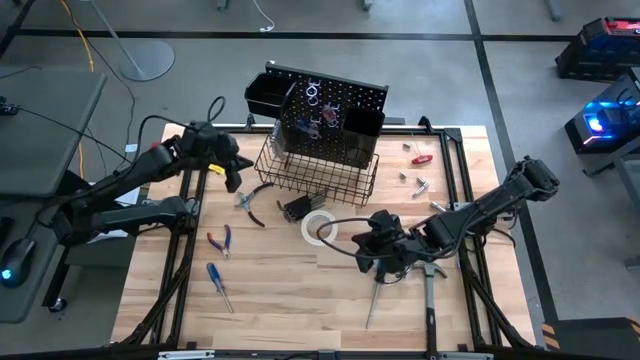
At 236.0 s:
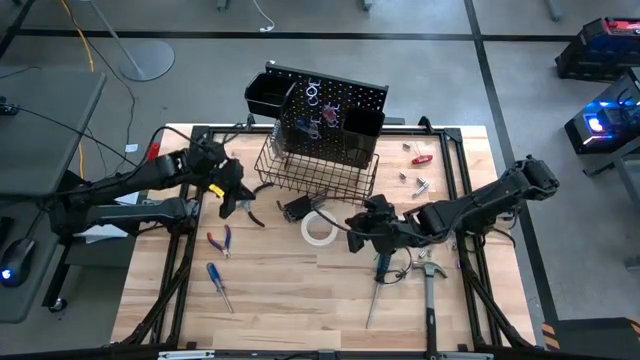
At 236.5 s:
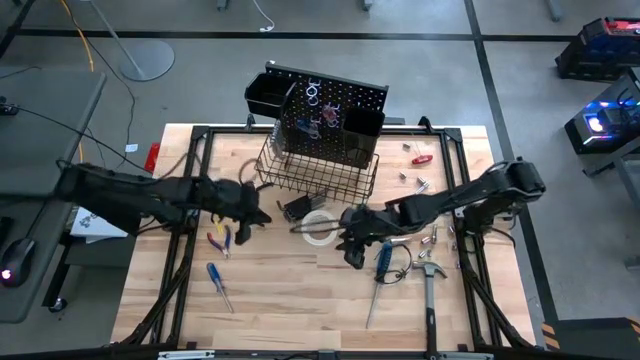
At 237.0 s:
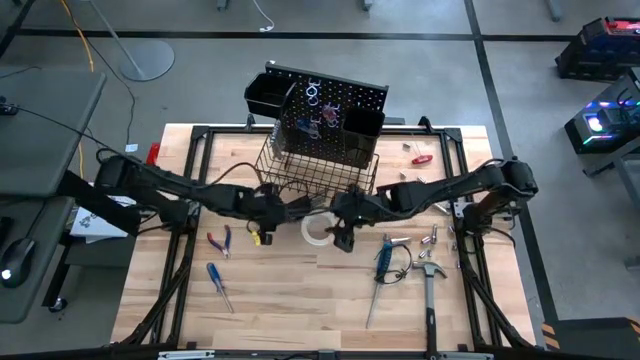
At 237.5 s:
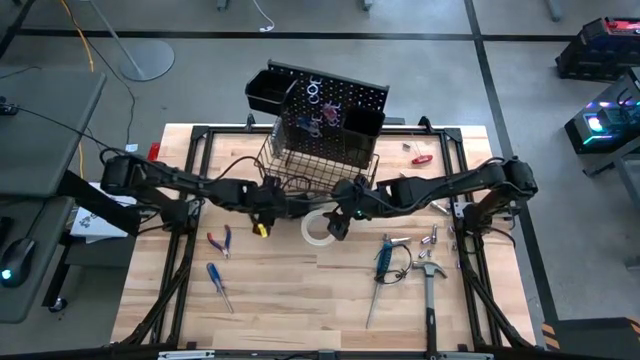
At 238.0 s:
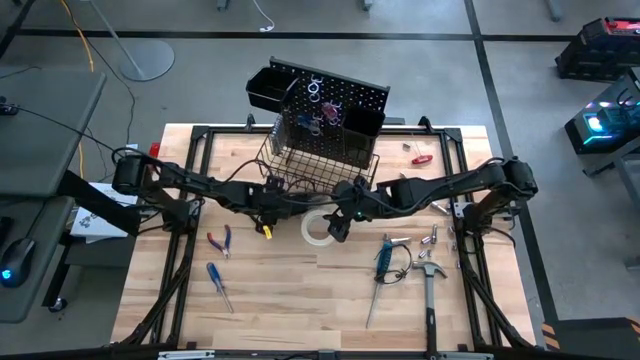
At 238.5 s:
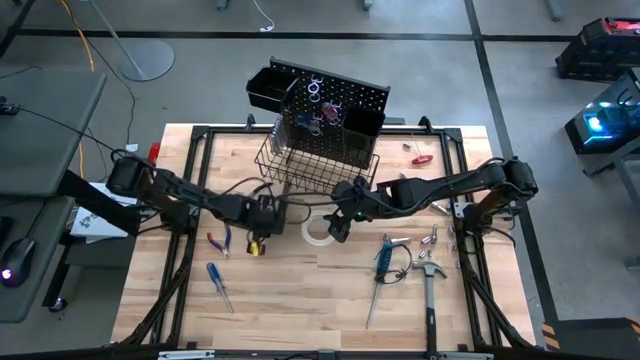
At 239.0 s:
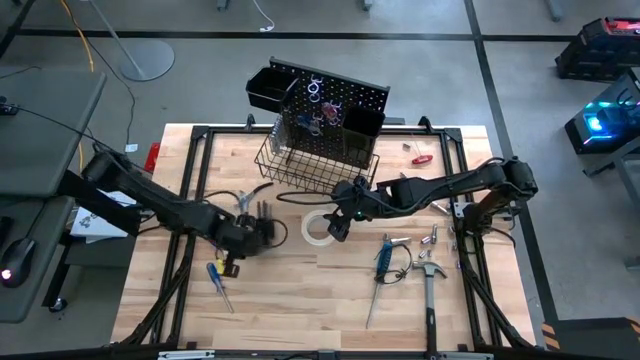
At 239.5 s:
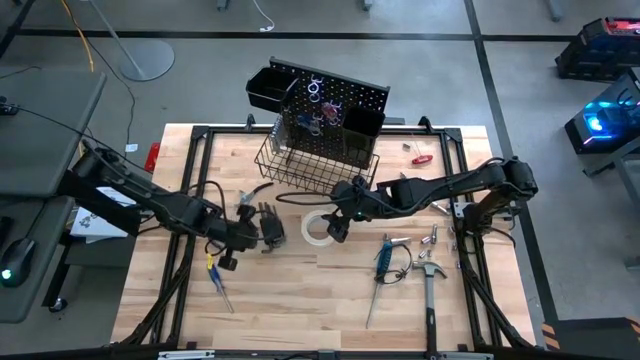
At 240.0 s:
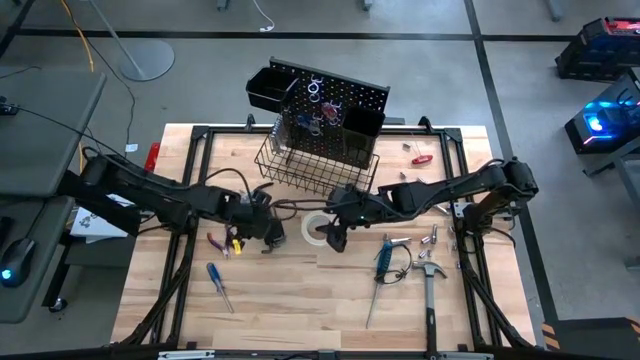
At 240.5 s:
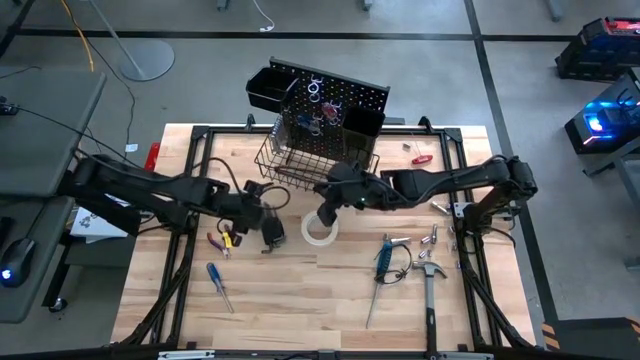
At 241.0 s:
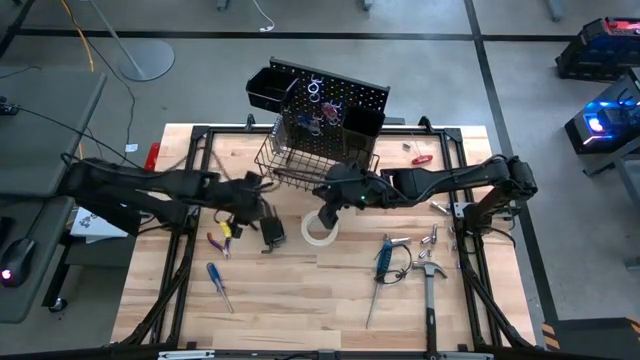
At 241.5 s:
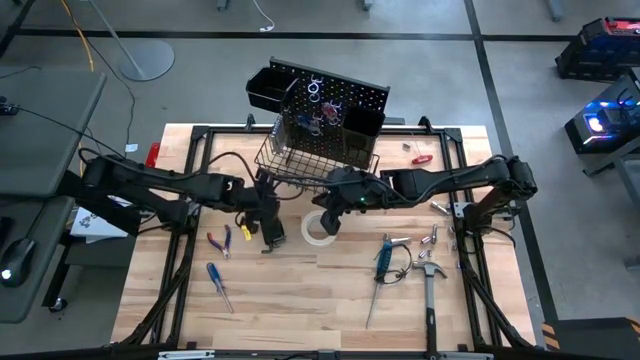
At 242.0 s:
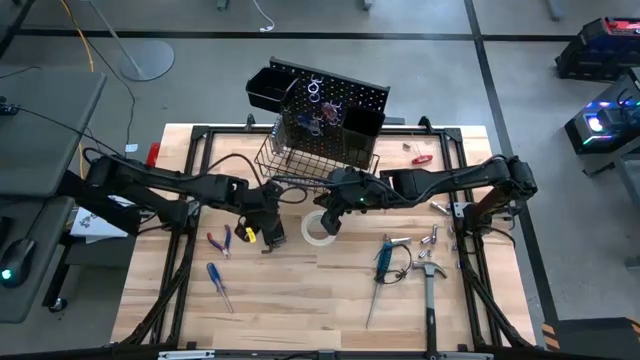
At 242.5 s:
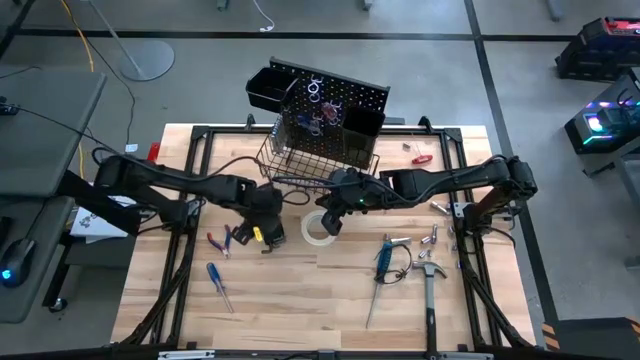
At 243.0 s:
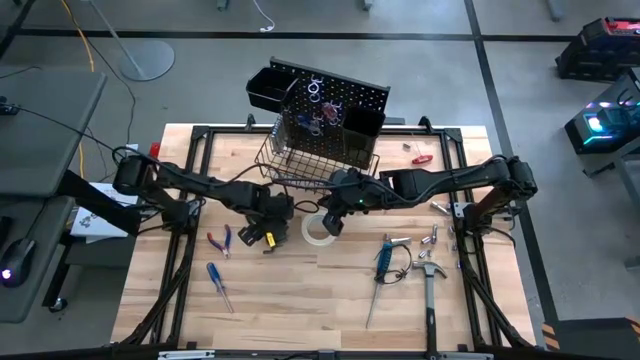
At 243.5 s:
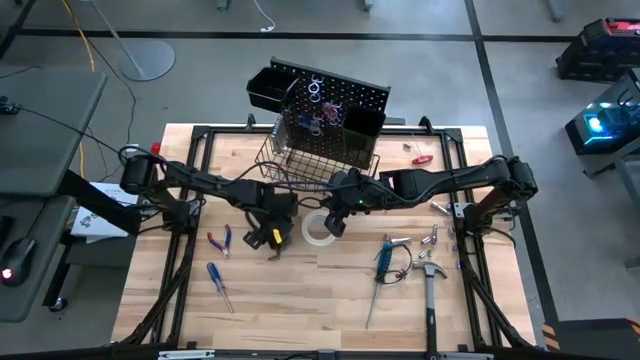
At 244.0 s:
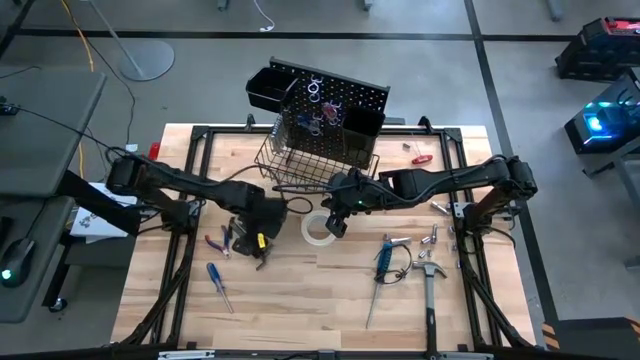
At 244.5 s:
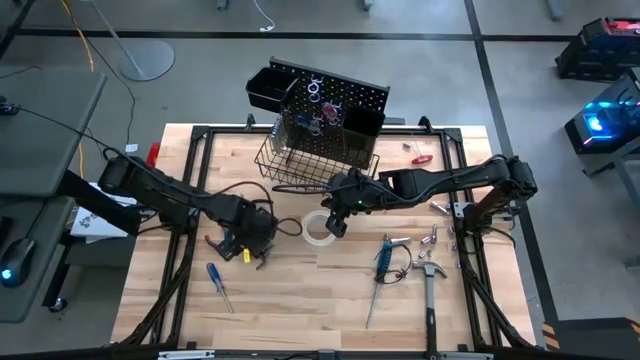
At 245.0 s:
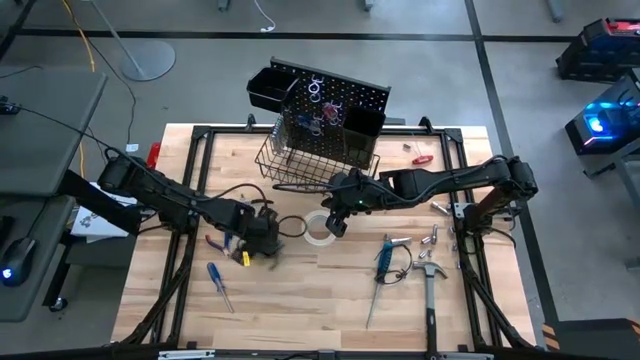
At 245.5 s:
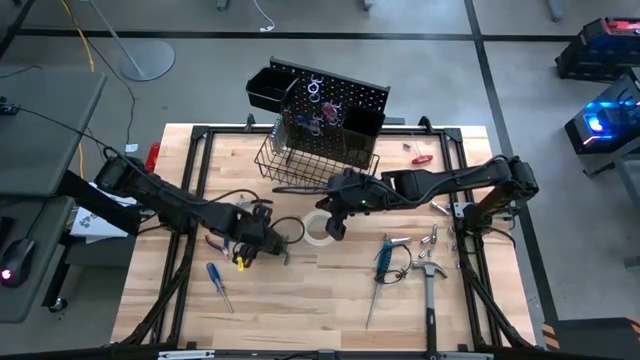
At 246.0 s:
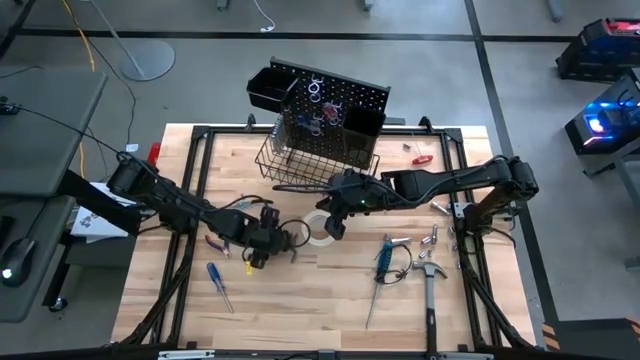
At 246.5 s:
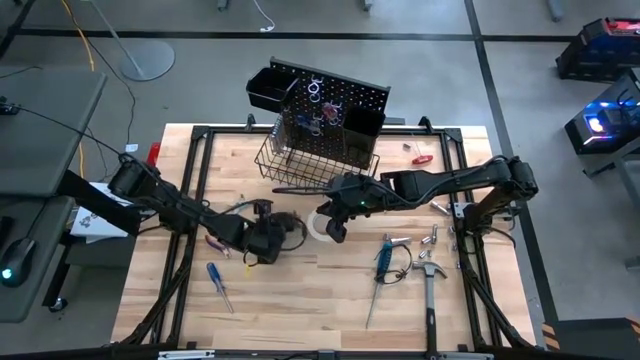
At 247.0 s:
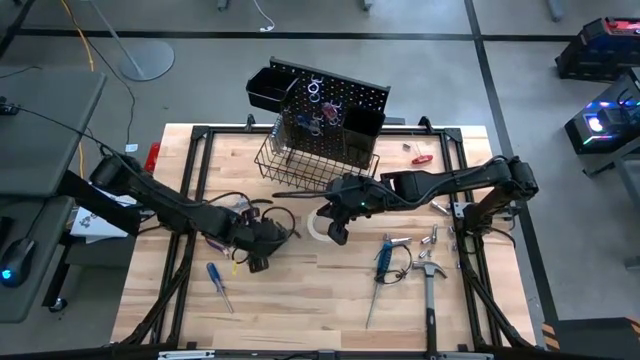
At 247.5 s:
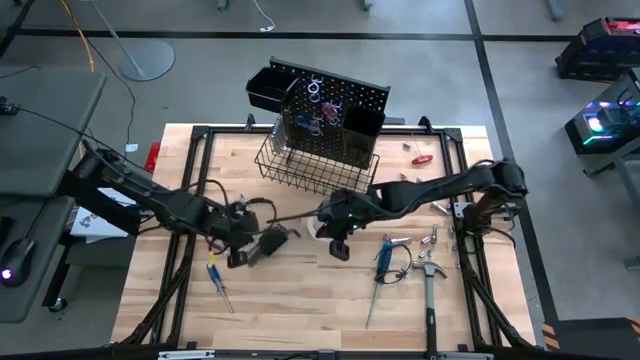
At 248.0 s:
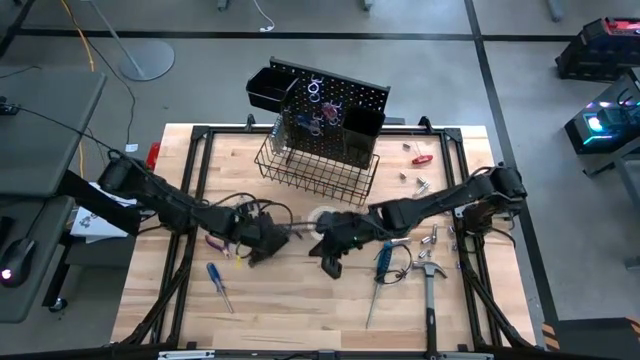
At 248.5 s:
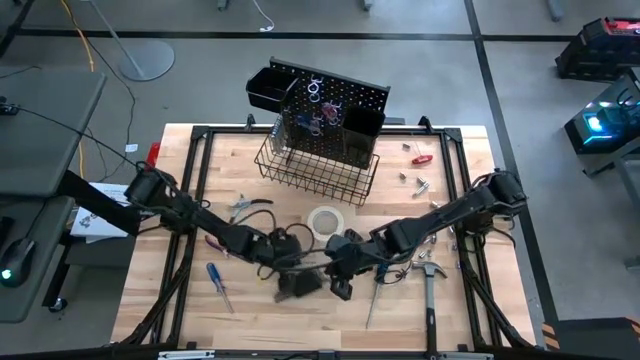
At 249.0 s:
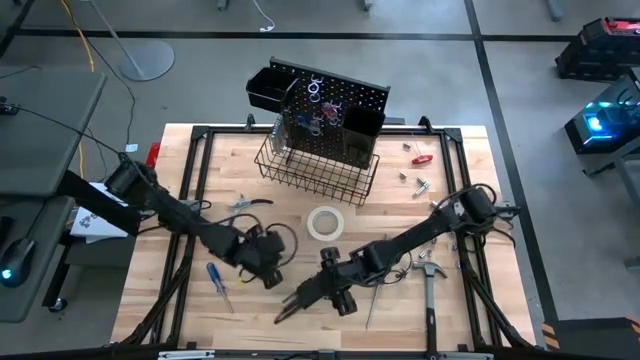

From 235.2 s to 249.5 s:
Task: Hang tools onto peg board
Put the allen wrench set in the wire basket on the pegboard

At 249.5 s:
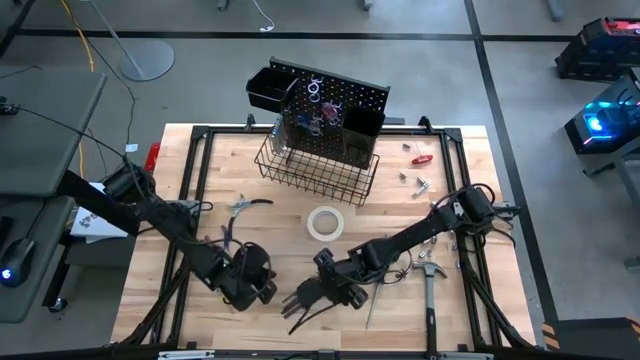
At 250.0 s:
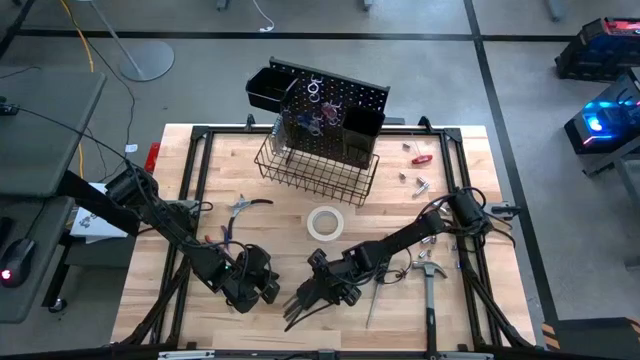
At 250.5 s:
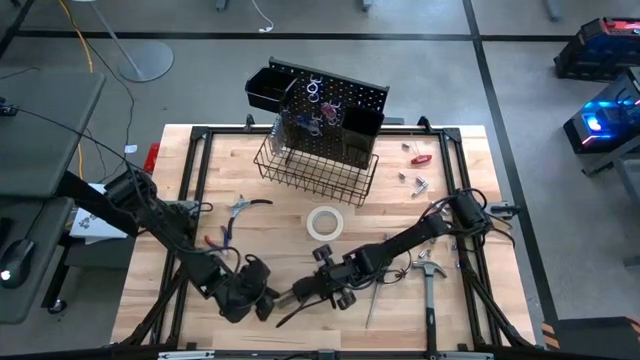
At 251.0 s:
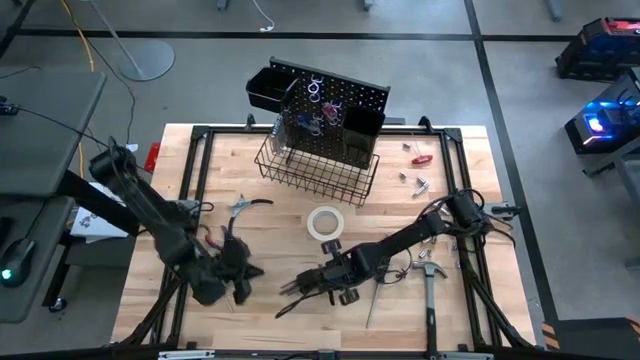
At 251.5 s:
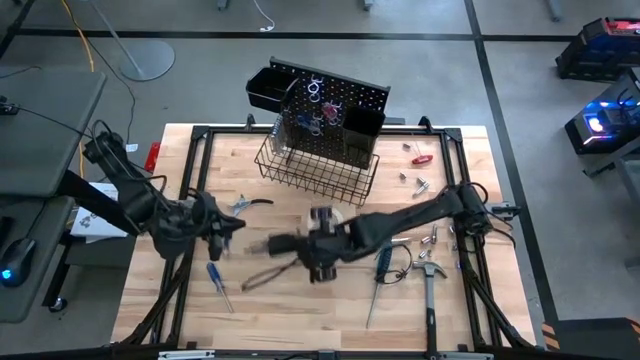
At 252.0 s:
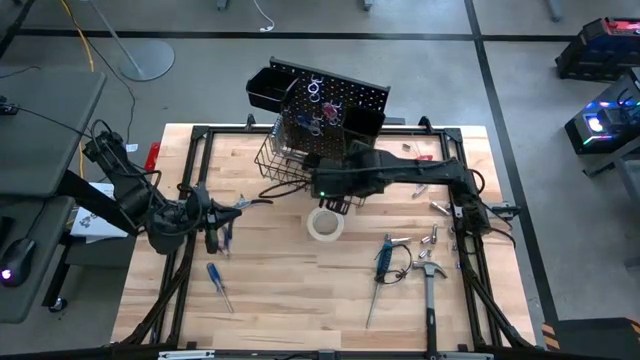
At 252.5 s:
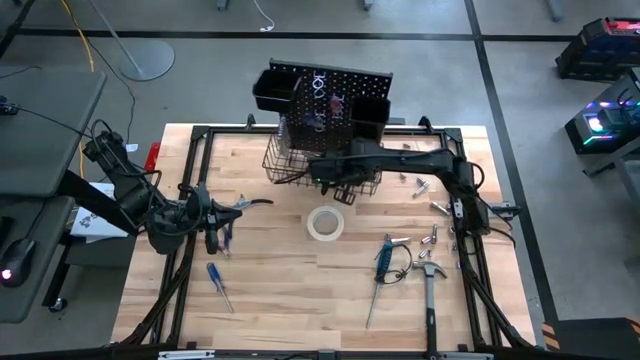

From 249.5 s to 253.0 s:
Put the allen wrench set in the wire basket on the pegboard

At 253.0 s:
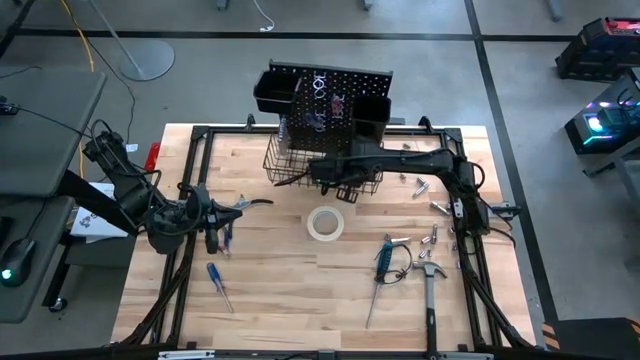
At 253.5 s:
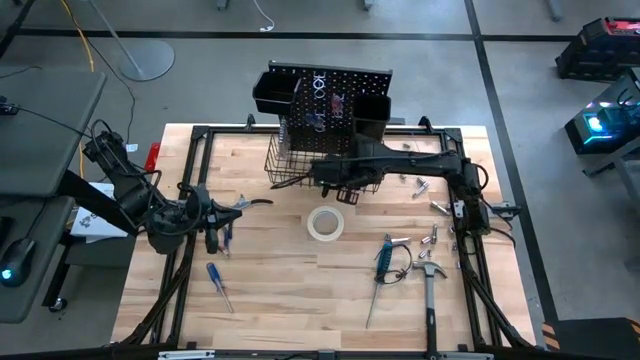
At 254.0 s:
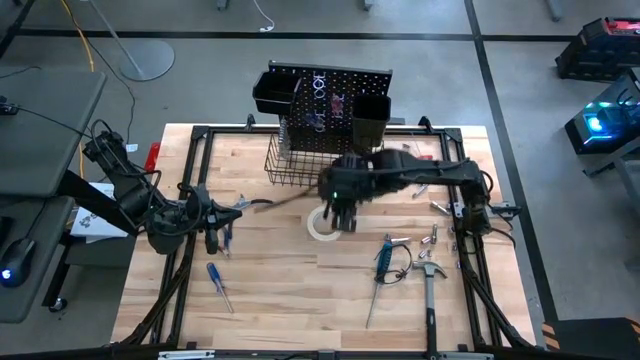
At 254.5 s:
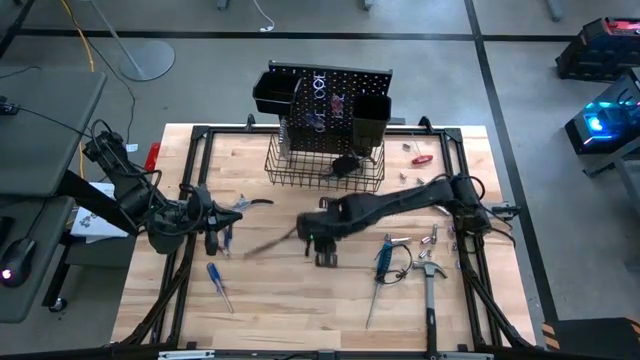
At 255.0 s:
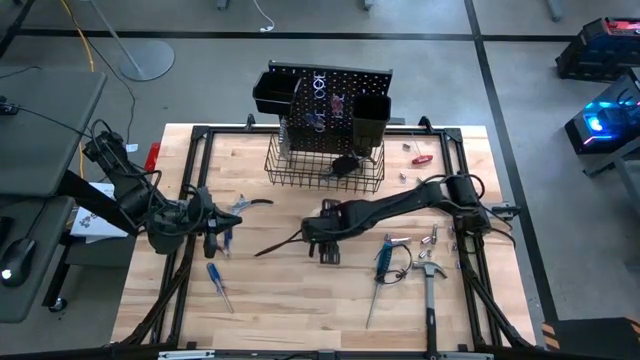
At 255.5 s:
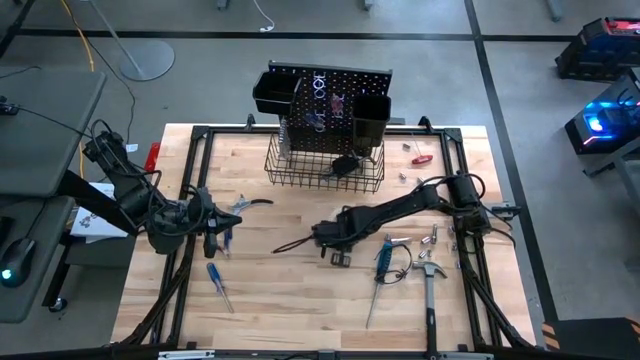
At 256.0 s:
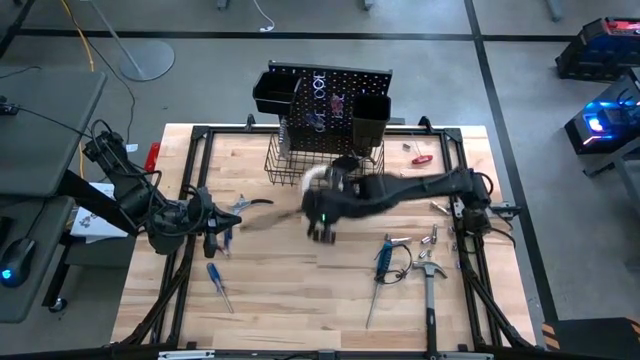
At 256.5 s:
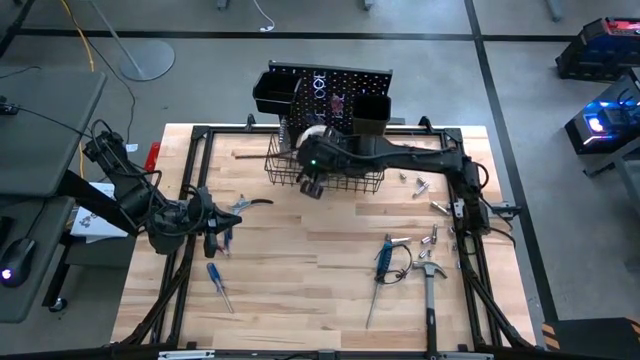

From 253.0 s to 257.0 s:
Put the masking tape in the wire basket on the pegboard
